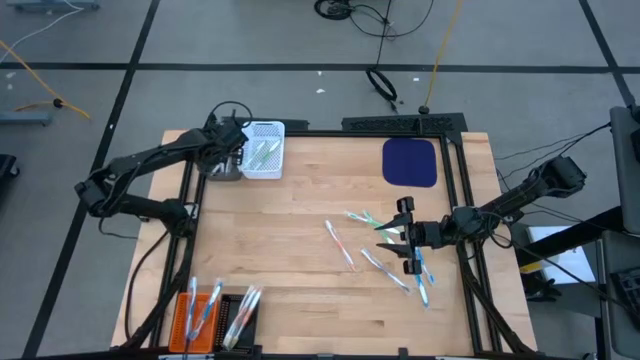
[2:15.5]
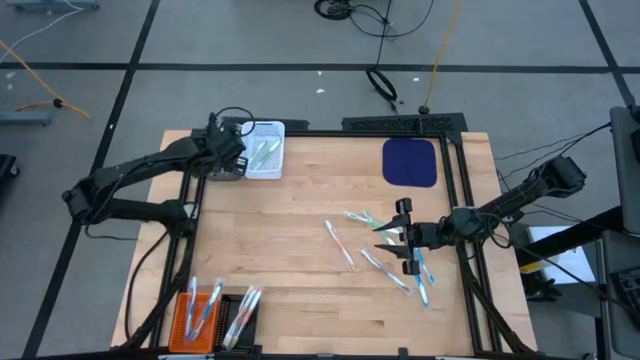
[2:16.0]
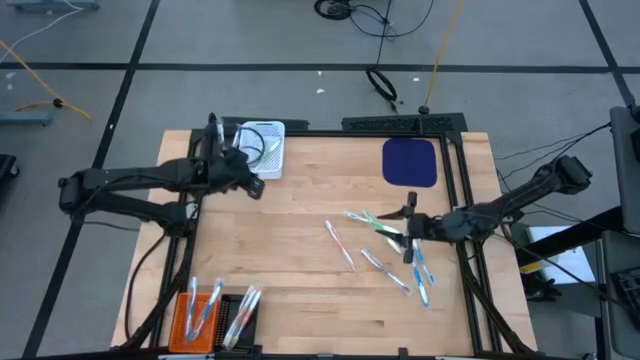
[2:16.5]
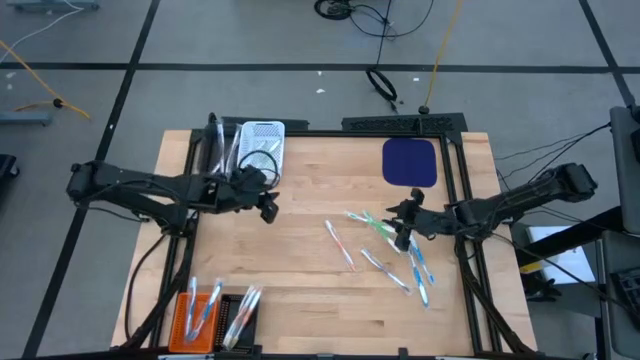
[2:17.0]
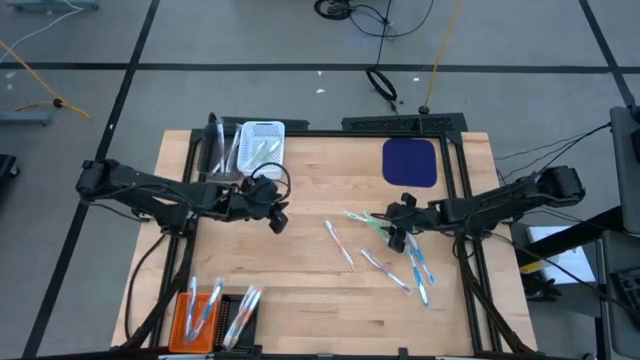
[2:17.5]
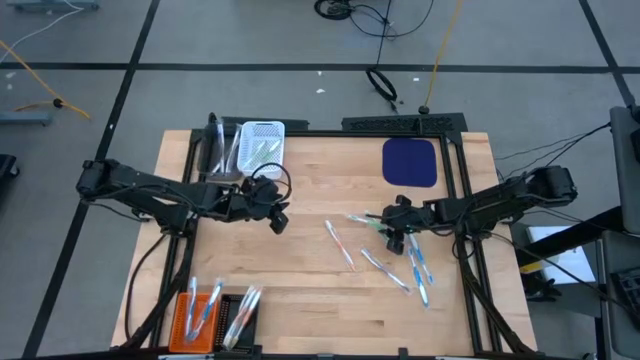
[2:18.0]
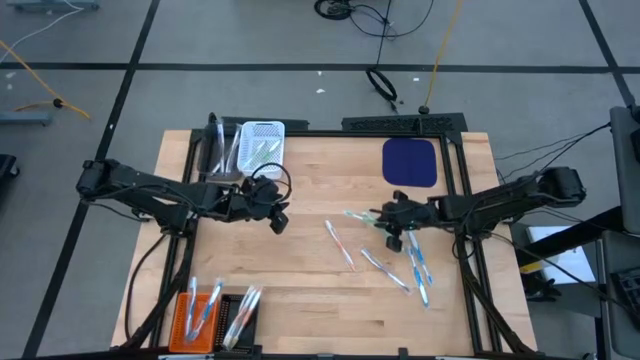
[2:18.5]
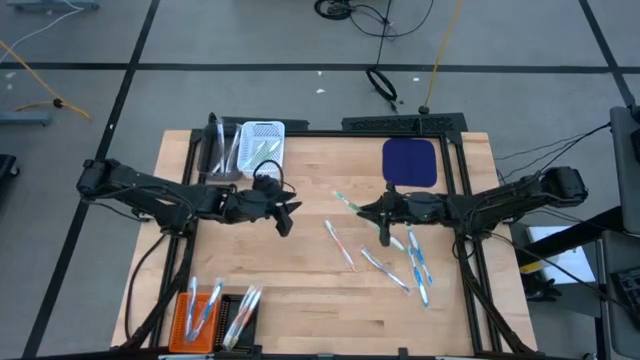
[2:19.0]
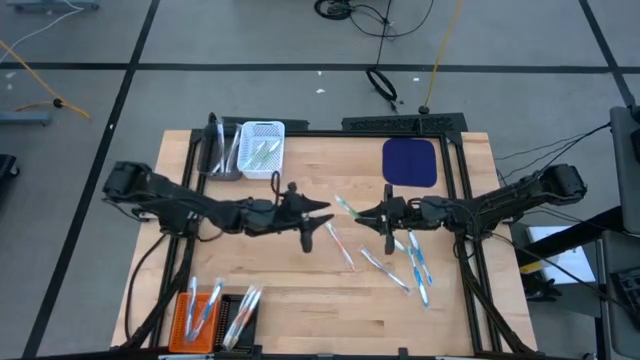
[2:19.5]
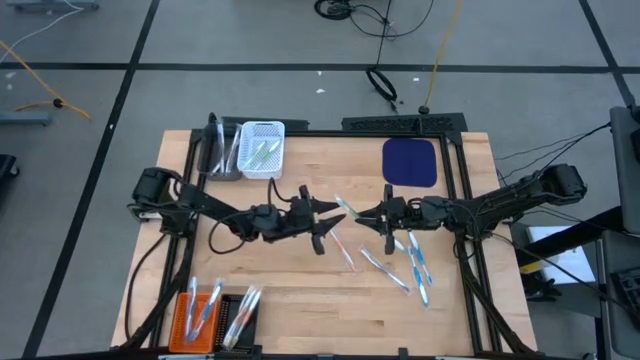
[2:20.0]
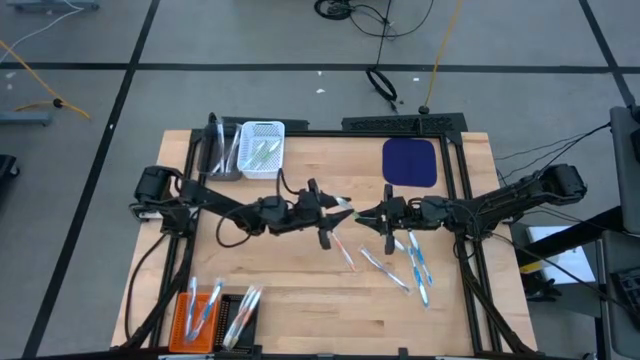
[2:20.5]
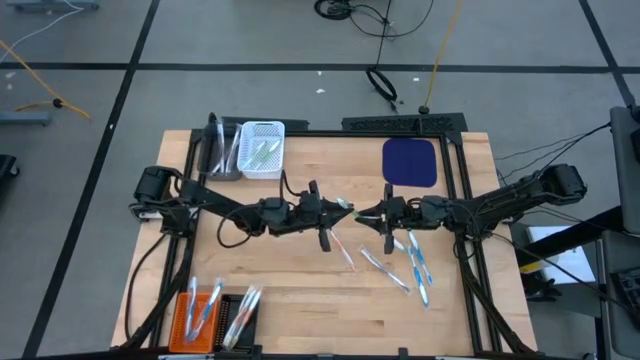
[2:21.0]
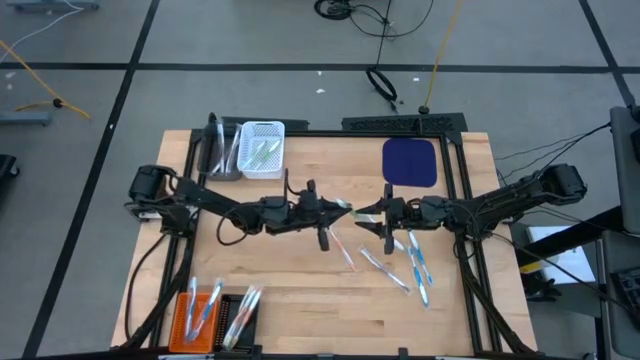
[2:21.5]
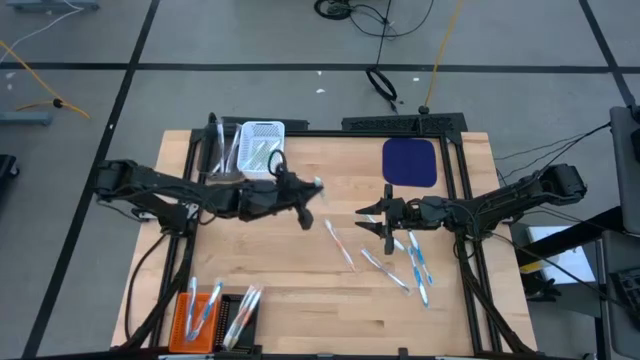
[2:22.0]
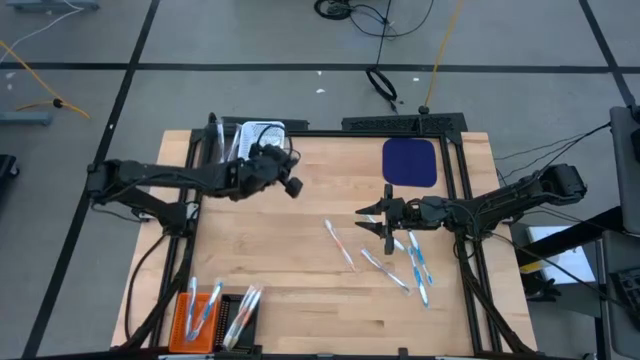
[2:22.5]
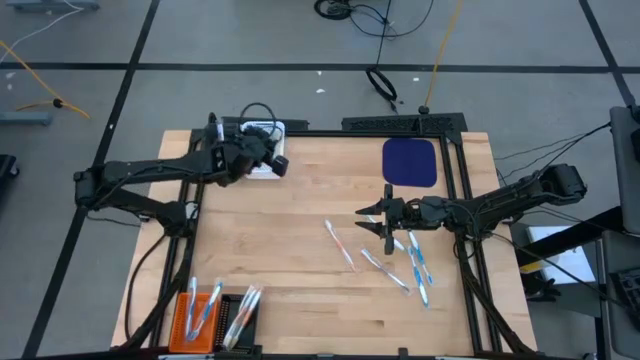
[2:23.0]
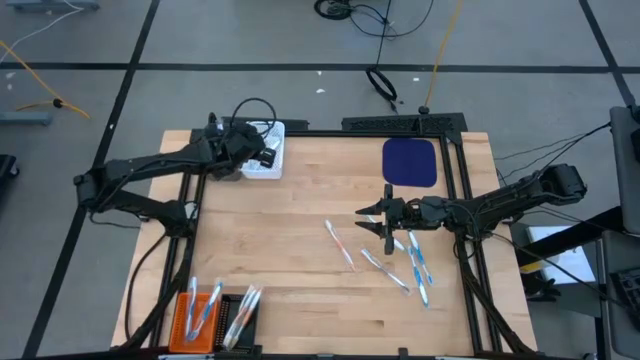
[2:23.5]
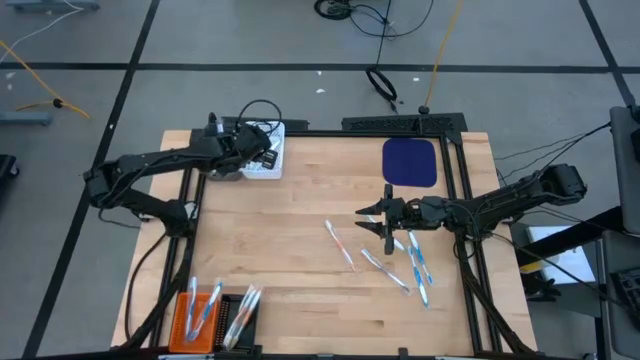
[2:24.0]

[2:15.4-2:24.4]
Task: Pick & Place Toothbrushes
Put the green toothbrush into the white bin

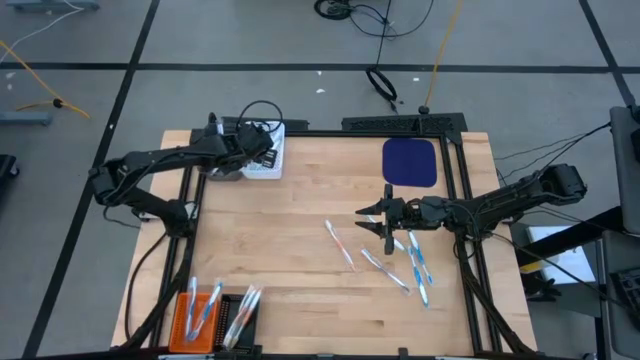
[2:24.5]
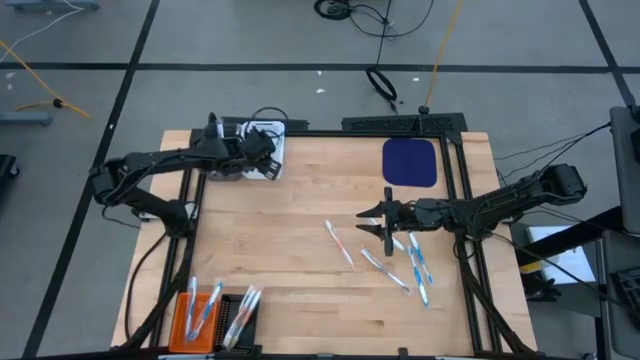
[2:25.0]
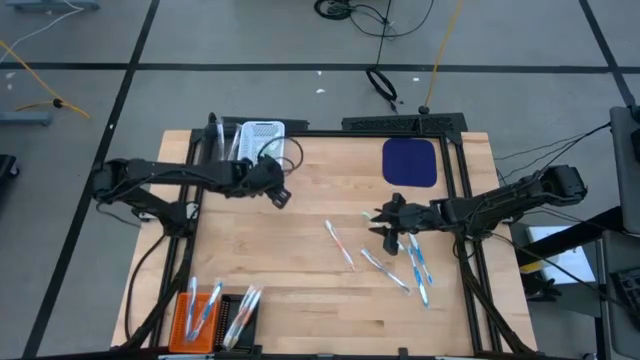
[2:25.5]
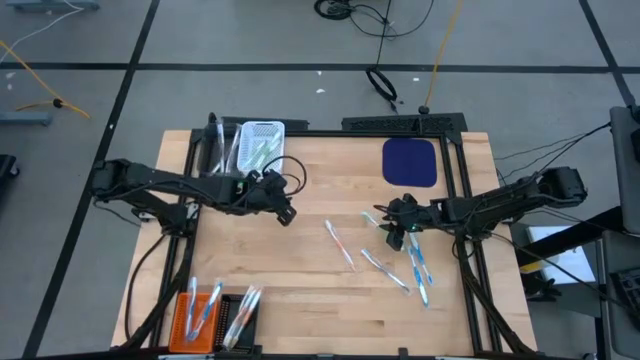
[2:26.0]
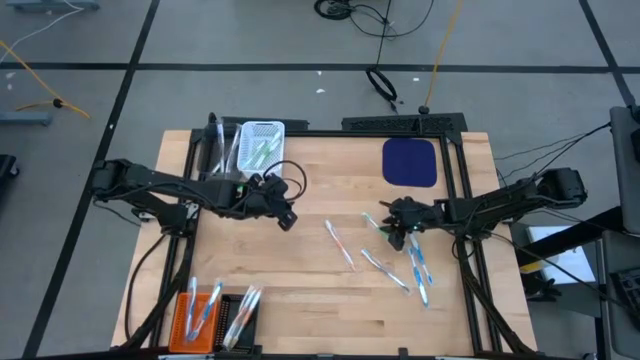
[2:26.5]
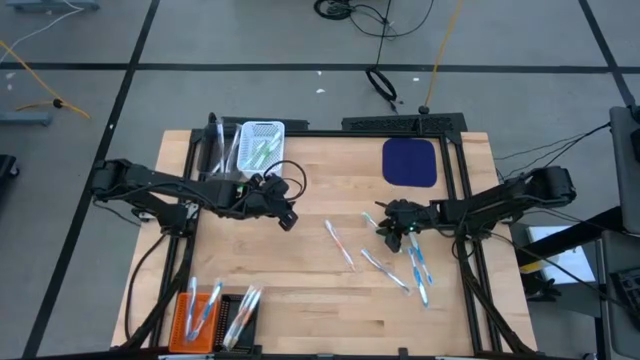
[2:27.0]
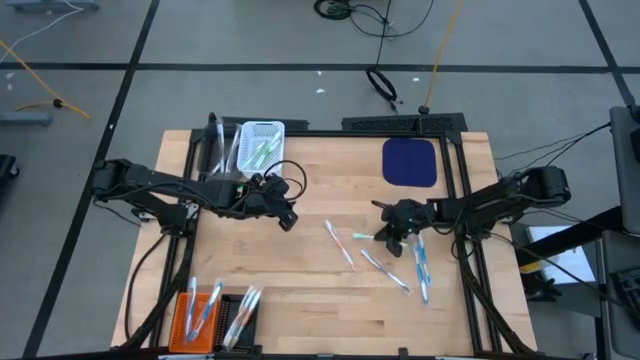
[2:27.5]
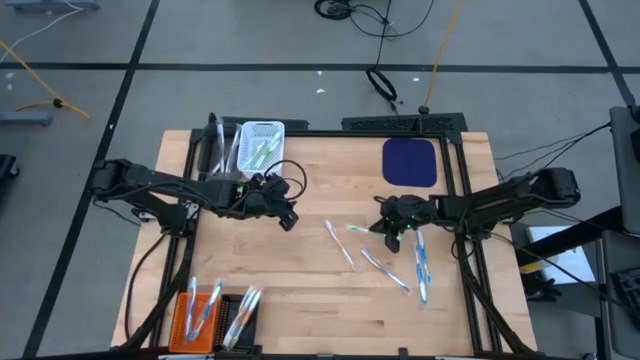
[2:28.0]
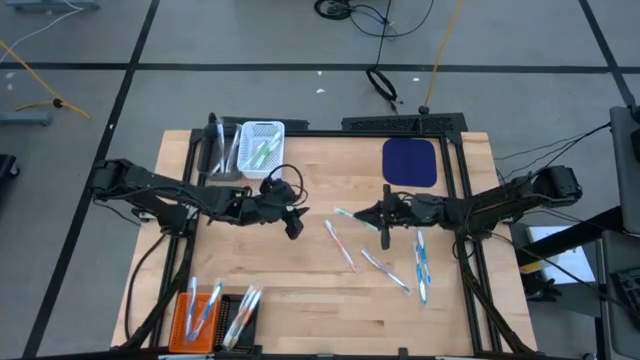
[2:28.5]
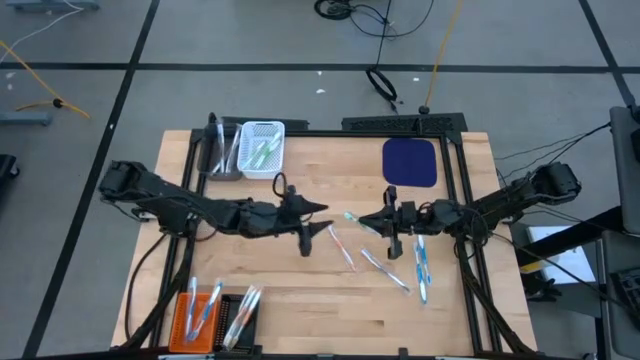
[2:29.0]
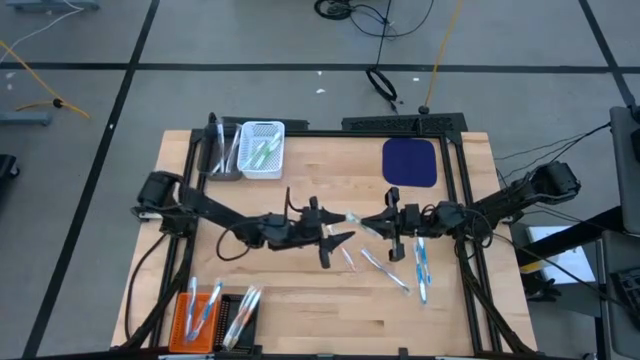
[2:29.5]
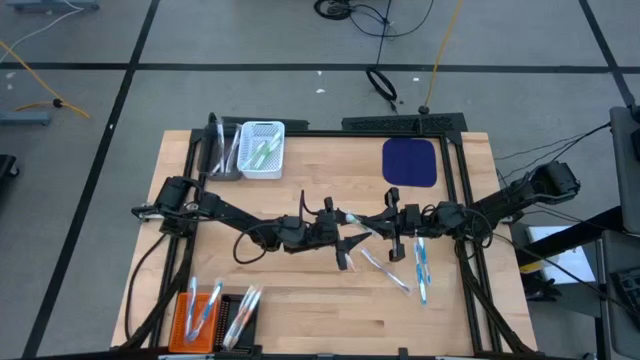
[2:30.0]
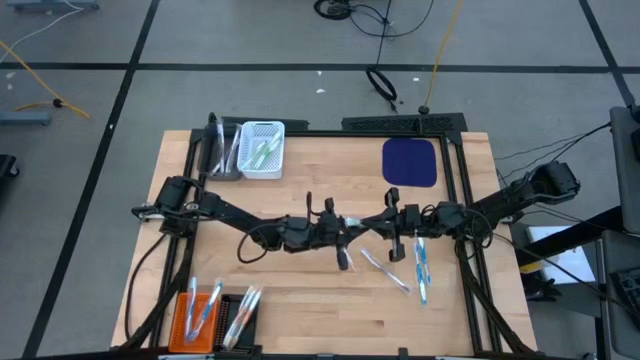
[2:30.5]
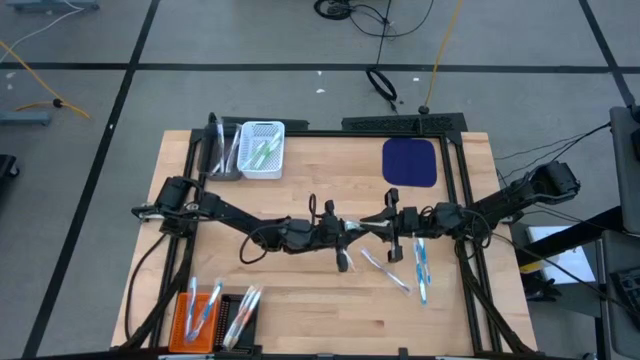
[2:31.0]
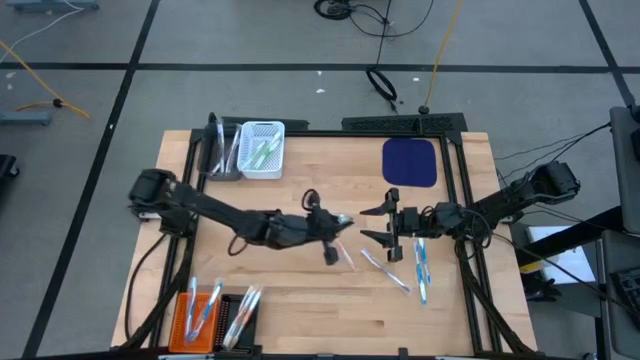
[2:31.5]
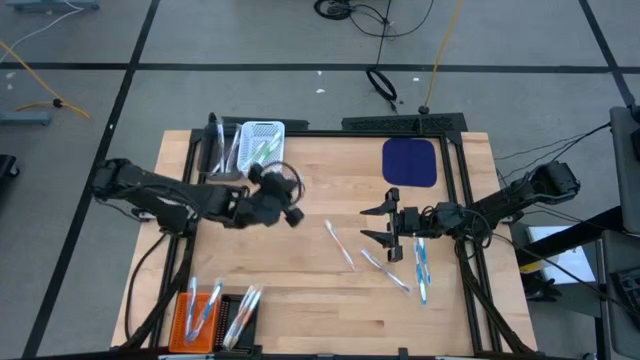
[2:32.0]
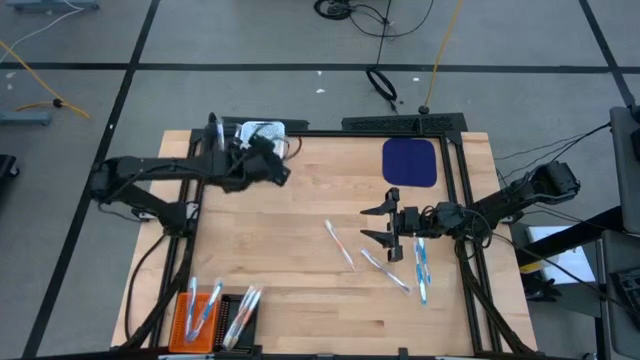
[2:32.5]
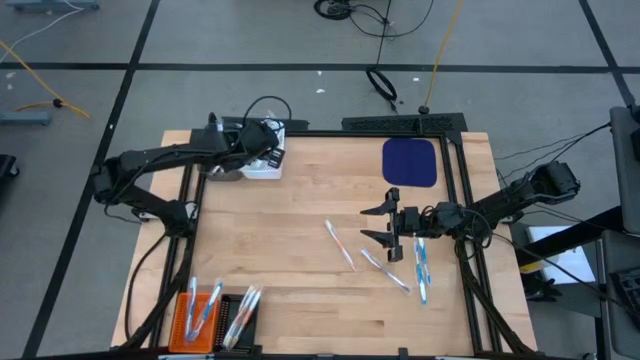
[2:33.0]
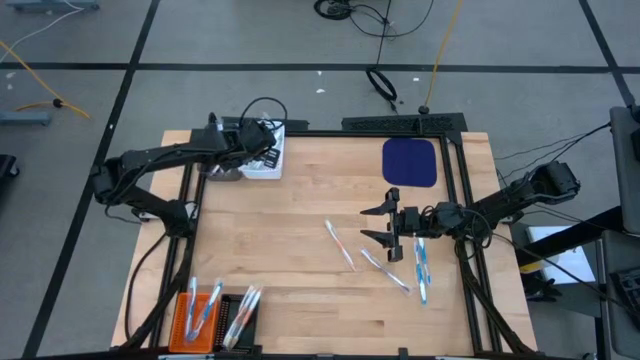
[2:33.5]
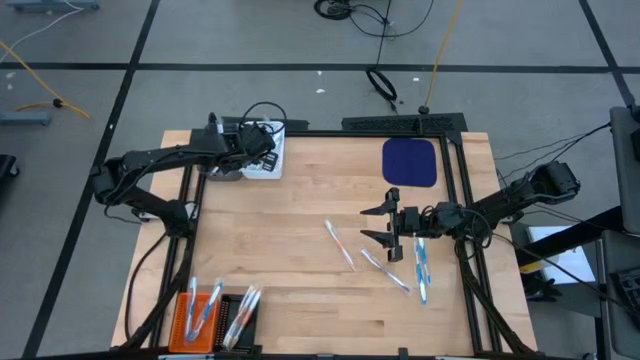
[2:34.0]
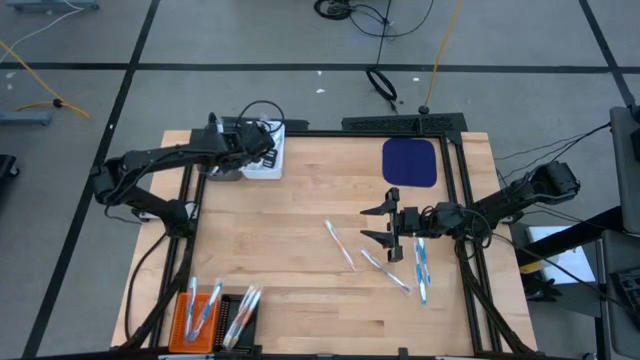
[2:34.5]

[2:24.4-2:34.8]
Put the green toothbrush into the white bin

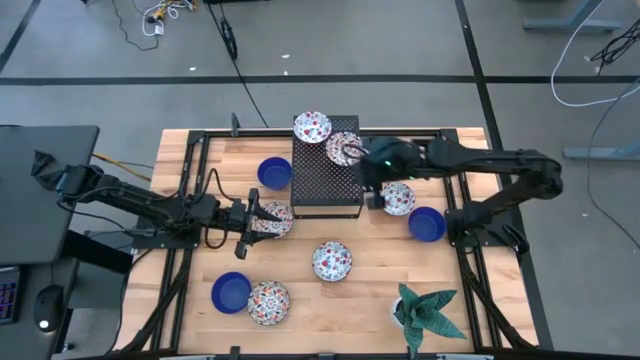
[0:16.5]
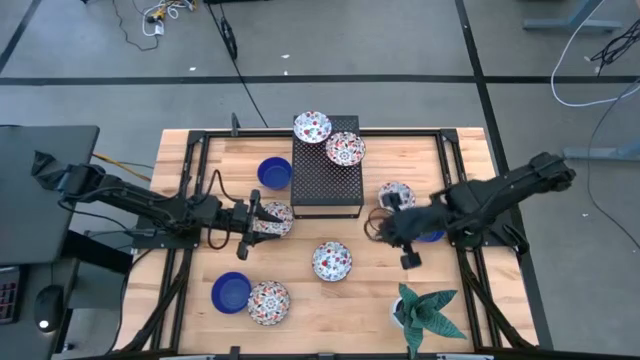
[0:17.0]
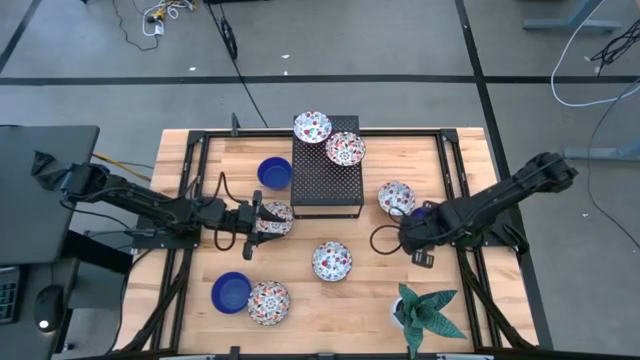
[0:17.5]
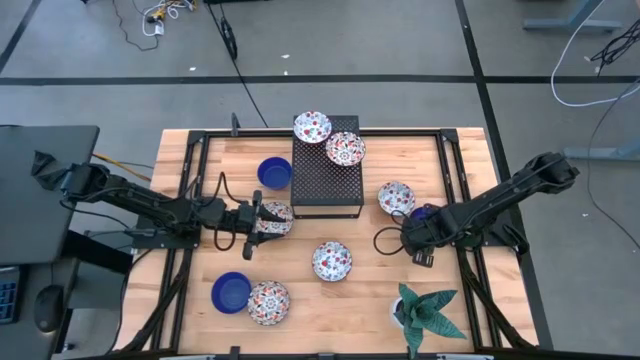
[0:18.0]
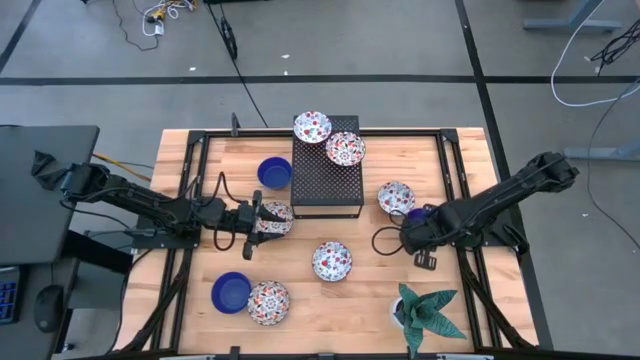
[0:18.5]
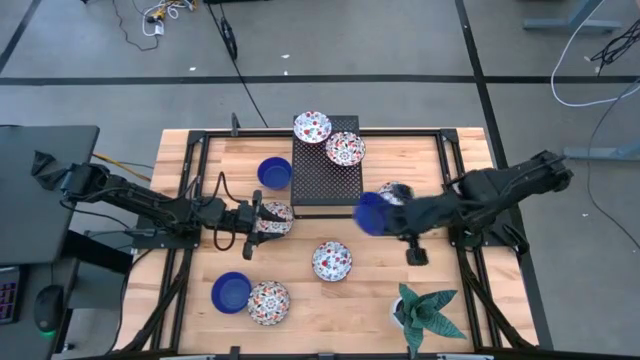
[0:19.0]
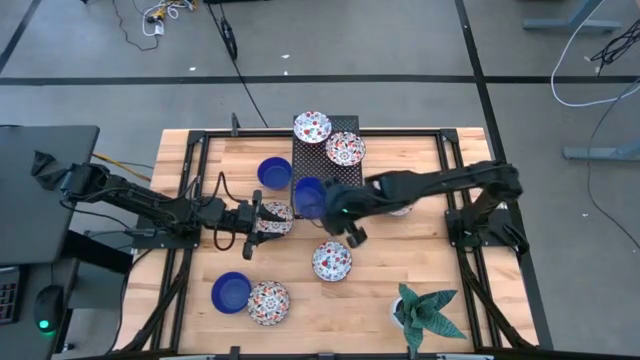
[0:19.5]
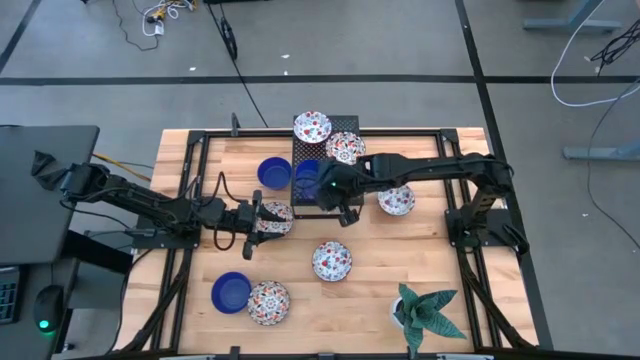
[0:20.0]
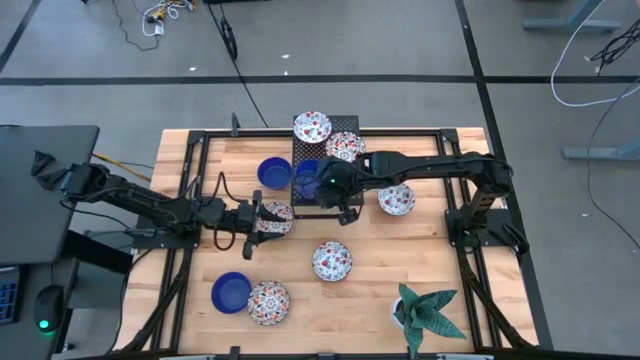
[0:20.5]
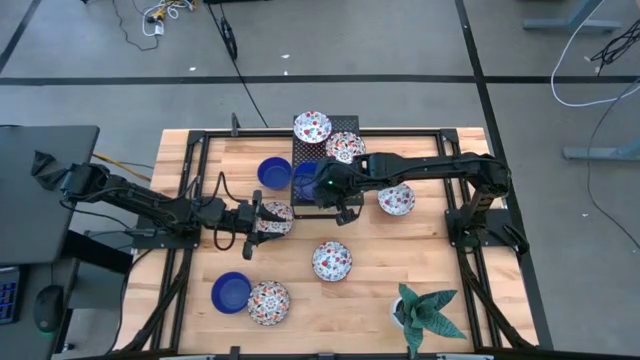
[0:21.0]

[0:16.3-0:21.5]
Task: Pick & Place Mini bowls
Put the right blue bowl on the shelf
